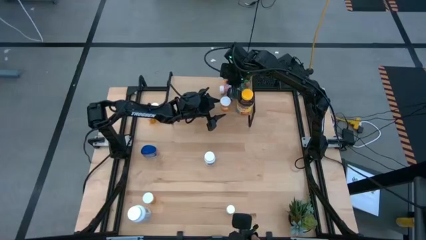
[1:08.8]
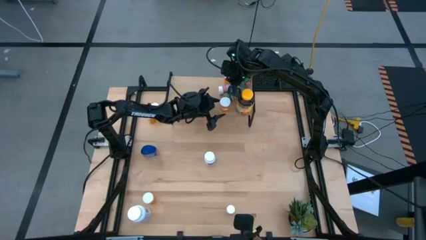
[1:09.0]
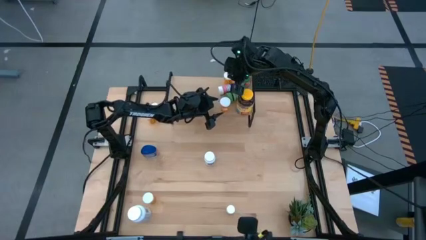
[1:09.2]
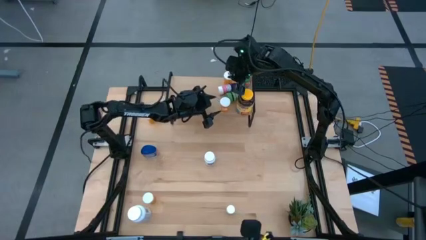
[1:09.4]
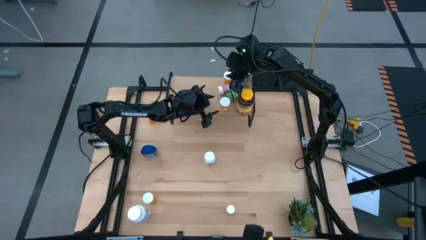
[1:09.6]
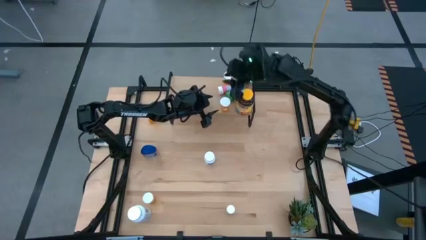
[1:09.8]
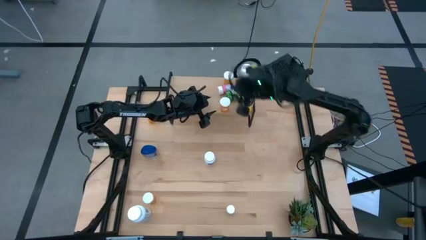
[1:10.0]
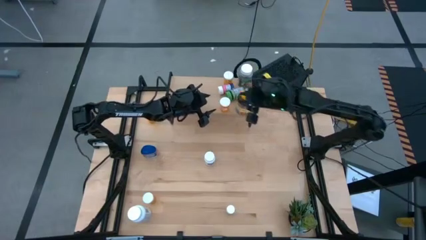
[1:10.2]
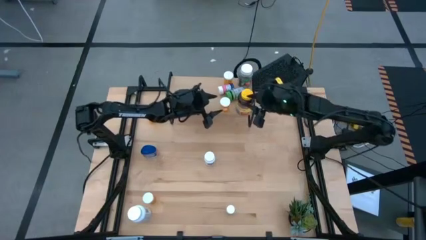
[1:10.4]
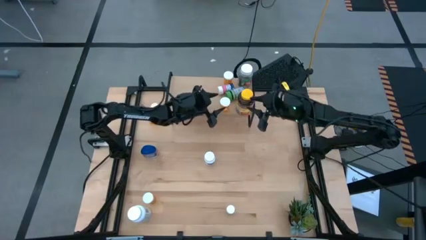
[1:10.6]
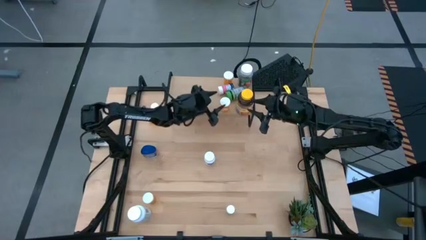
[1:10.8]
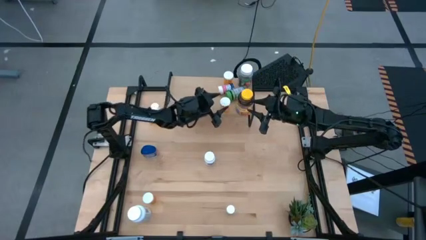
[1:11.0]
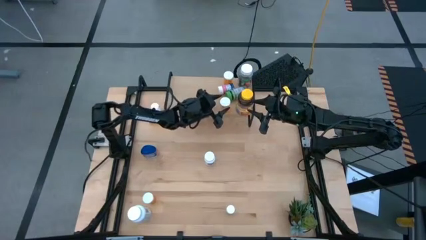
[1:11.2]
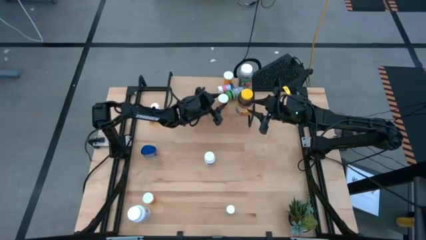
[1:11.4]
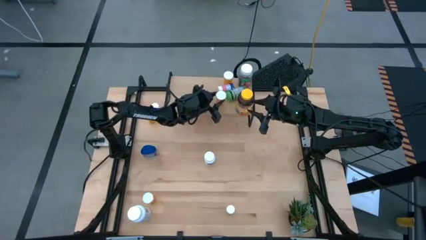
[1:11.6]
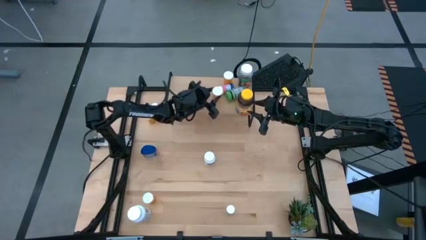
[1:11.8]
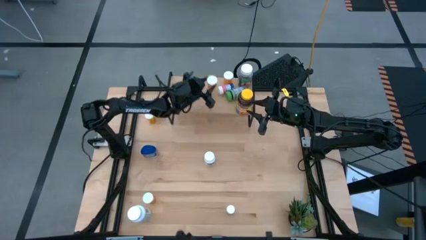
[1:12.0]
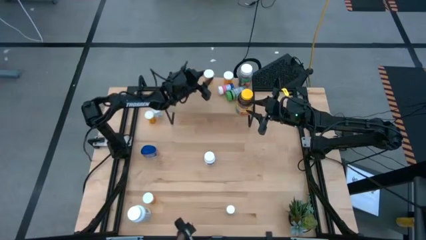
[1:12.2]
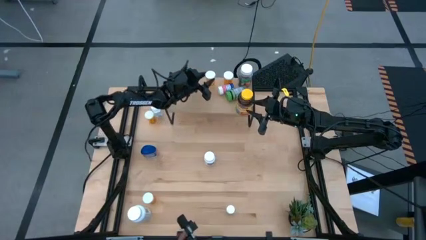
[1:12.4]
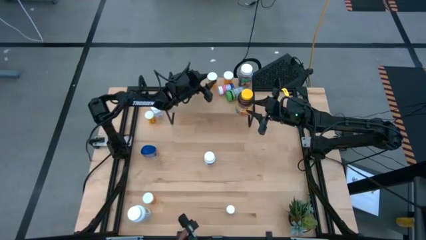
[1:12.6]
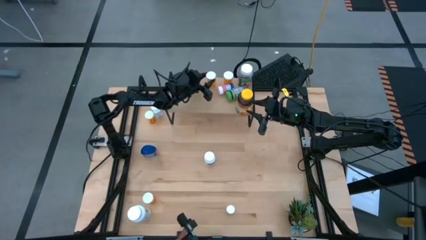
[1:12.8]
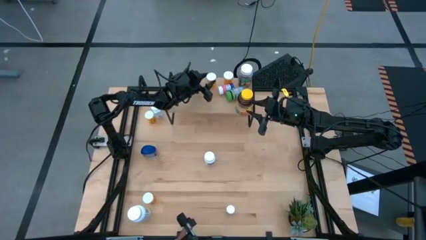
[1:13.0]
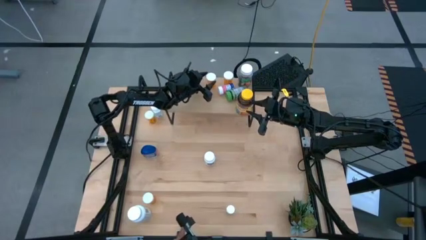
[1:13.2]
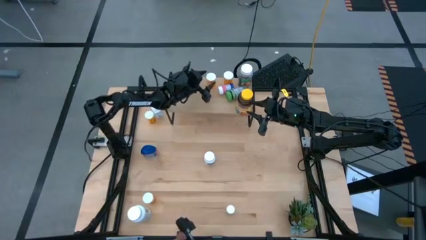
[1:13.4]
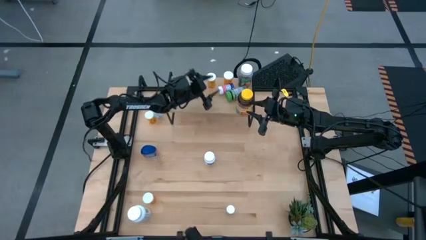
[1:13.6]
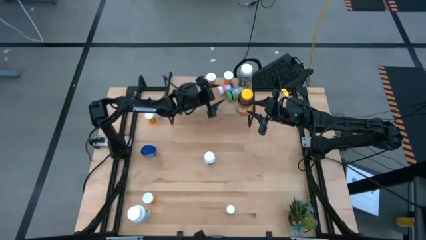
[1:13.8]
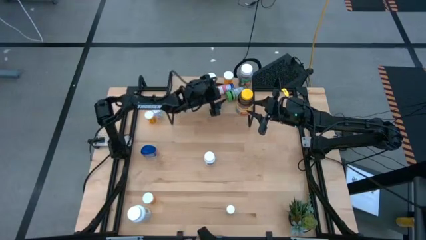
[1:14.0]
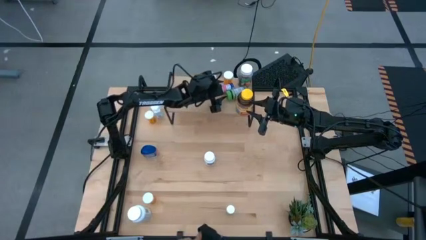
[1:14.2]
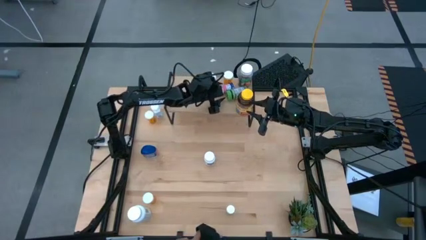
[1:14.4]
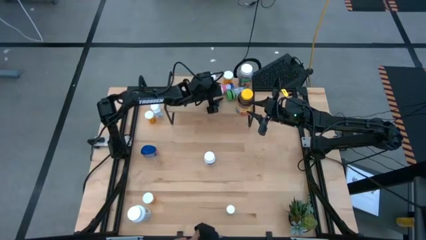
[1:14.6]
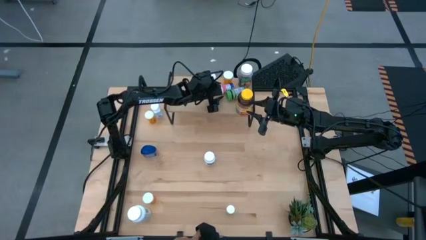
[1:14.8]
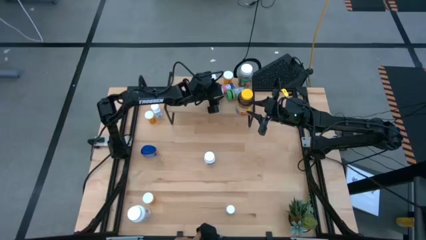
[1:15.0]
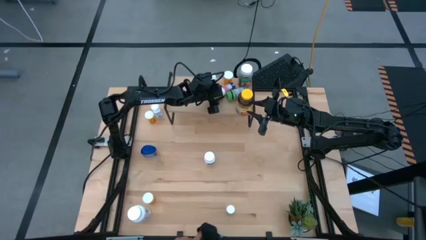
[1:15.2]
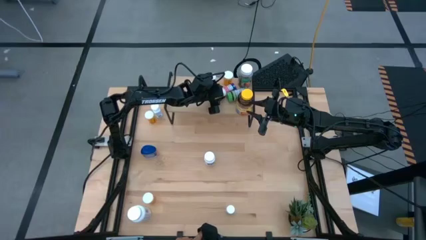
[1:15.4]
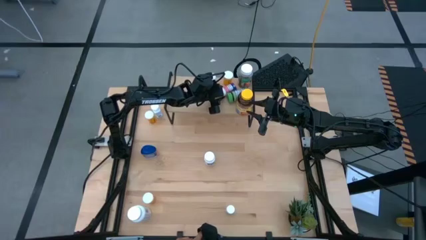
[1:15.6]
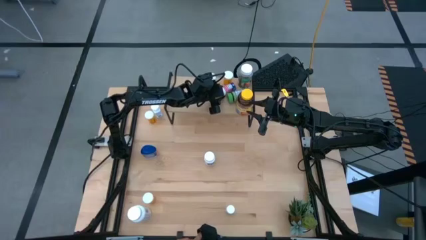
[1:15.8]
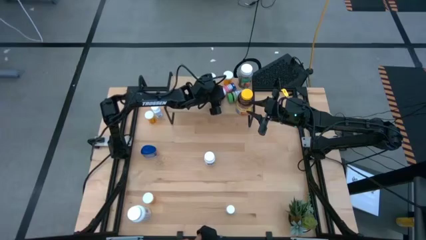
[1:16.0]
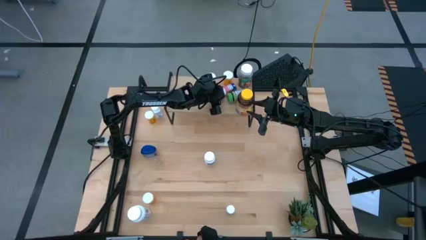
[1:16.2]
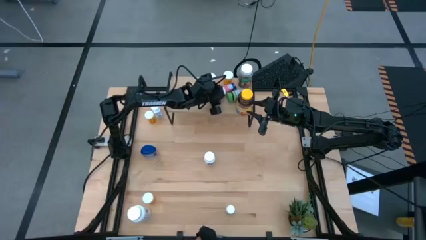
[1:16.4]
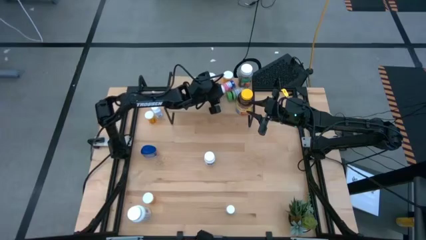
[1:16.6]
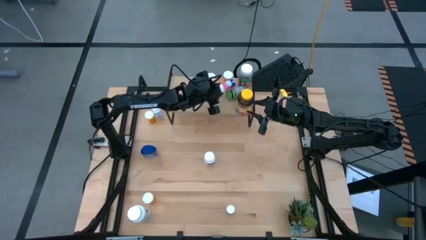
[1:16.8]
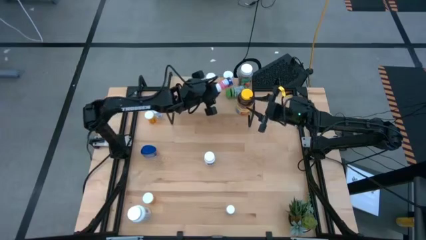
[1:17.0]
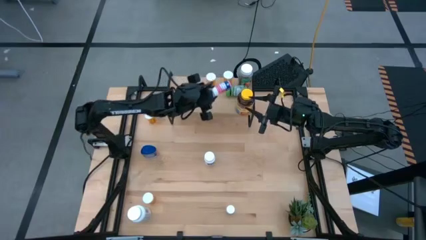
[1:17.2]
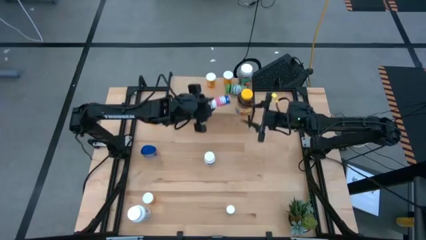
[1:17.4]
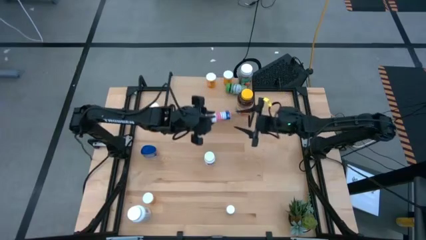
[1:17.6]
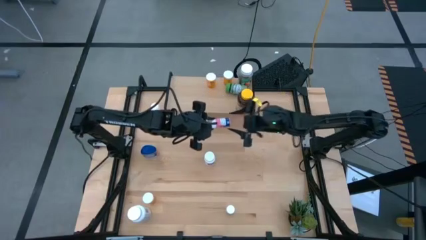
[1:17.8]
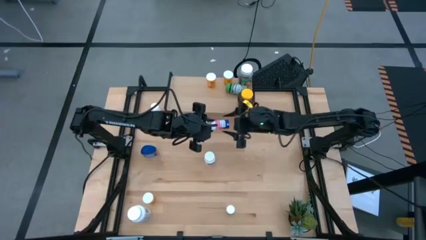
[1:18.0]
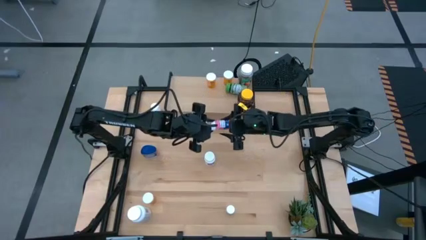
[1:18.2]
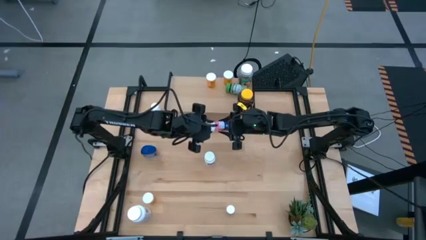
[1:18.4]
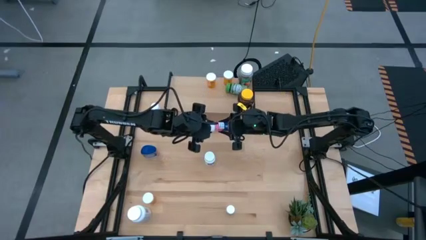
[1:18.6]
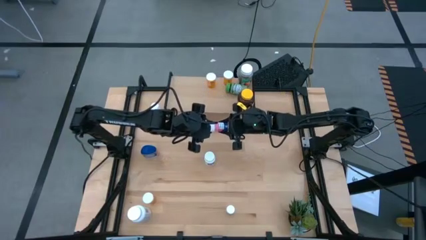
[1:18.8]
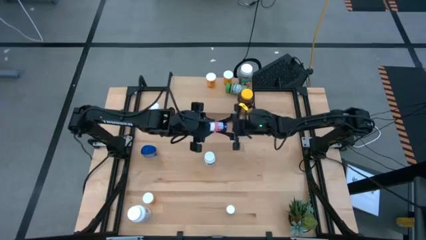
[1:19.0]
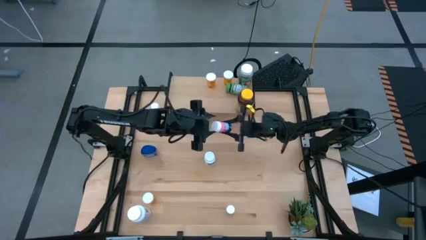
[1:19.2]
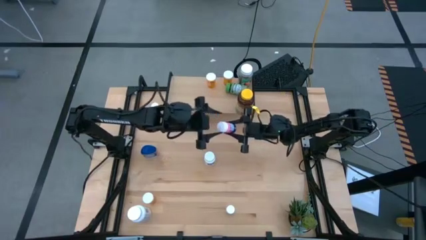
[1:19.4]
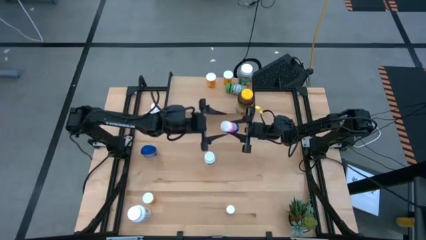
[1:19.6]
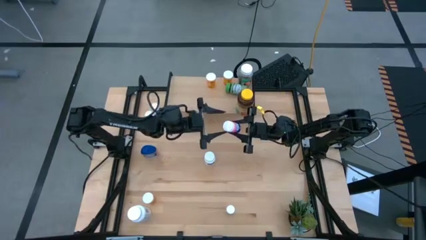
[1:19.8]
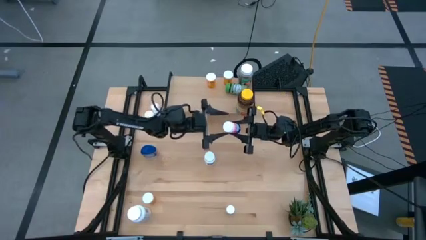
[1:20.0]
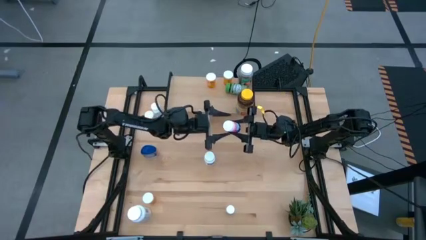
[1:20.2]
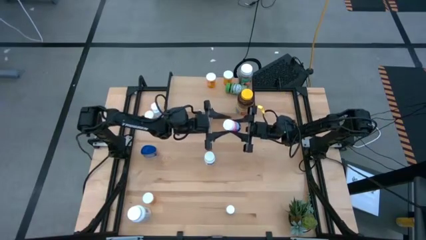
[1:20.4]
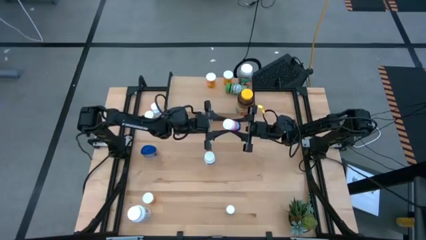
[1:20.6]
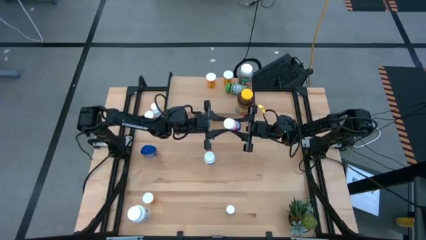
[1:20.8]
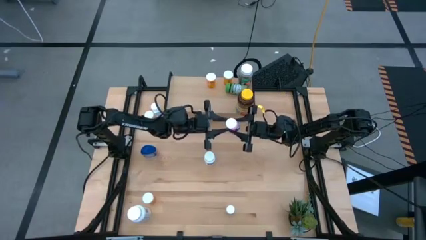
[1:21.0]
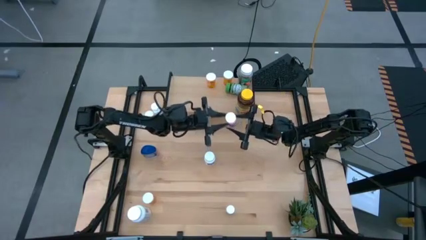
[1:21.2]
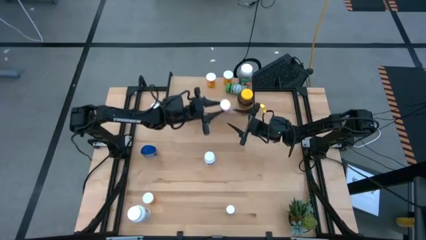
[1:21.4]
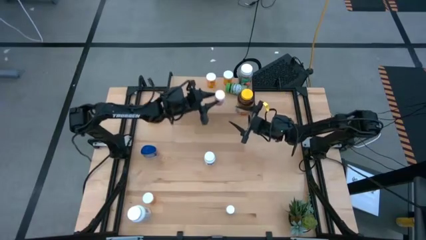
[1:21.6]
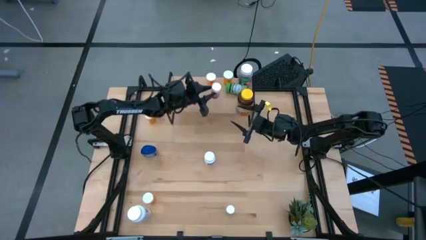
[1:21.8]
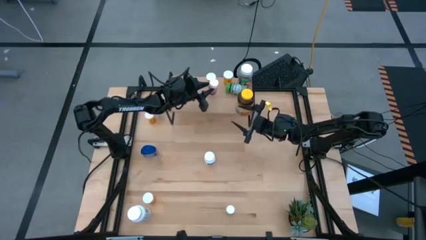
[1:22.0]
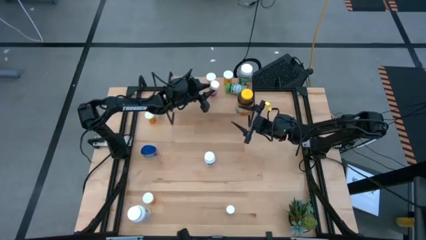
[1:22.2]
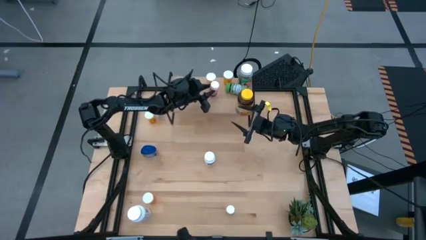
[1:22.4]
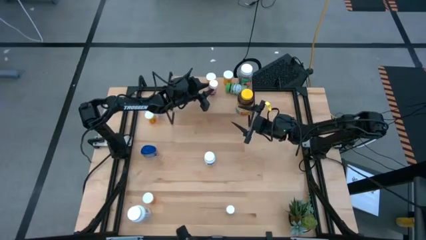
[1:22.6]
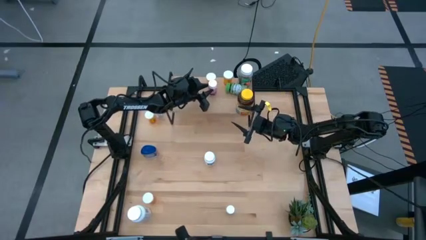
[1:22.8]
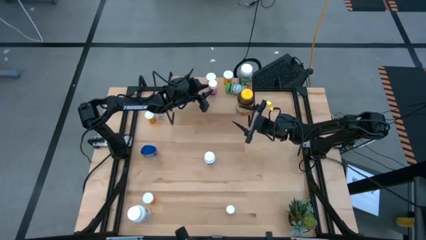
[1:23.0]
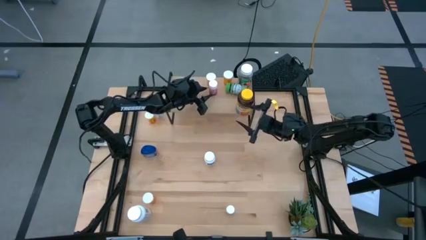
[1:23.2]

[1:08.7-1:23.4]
Task: Pick and place medicine bottles onto shelf by color
Adjust the pill bottles on the shelf
